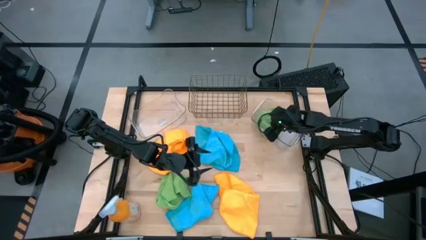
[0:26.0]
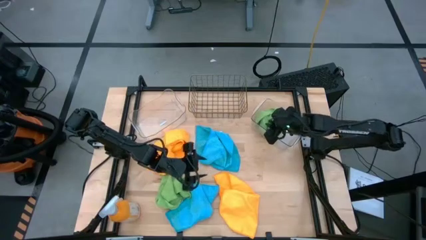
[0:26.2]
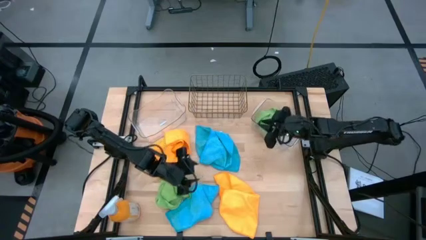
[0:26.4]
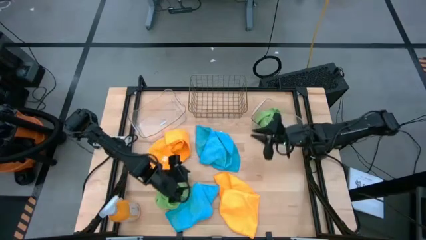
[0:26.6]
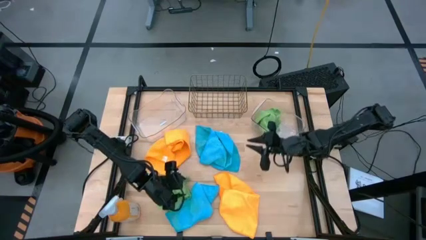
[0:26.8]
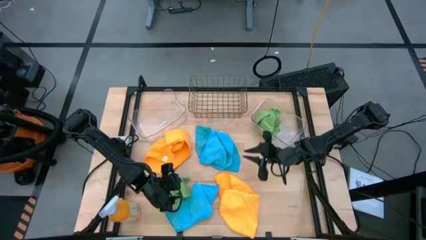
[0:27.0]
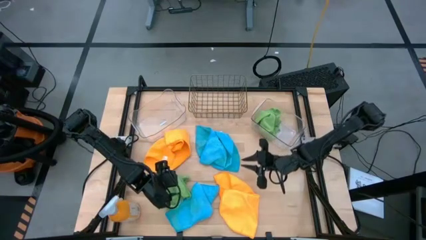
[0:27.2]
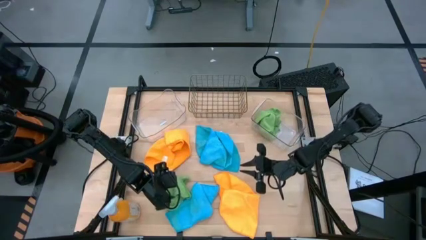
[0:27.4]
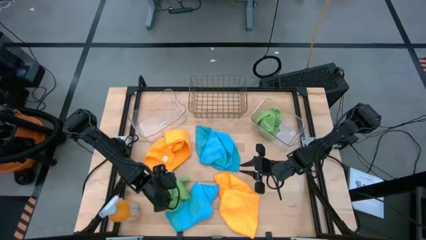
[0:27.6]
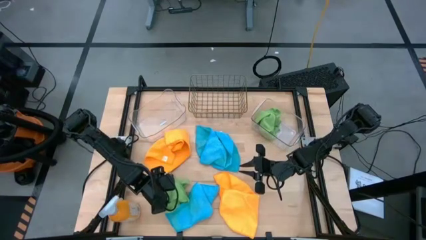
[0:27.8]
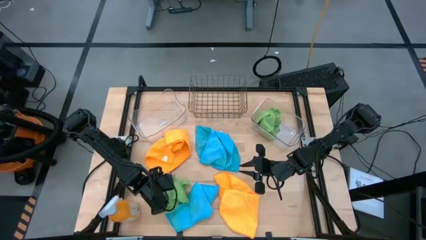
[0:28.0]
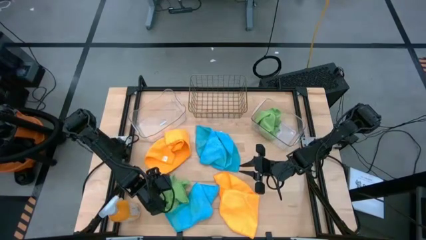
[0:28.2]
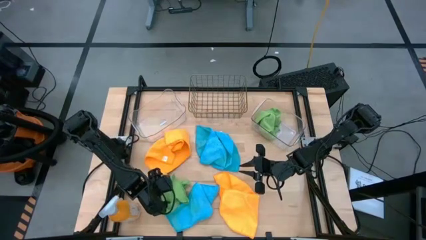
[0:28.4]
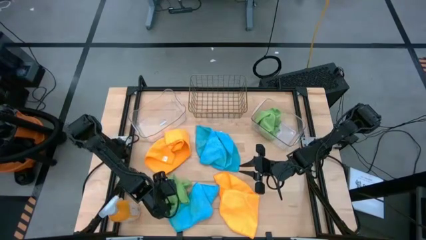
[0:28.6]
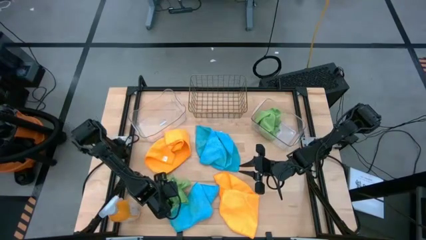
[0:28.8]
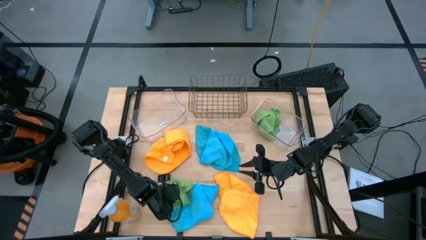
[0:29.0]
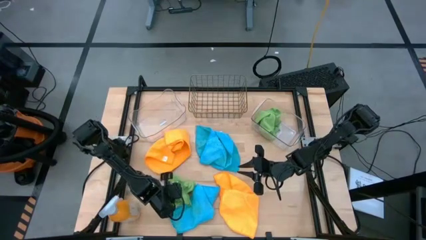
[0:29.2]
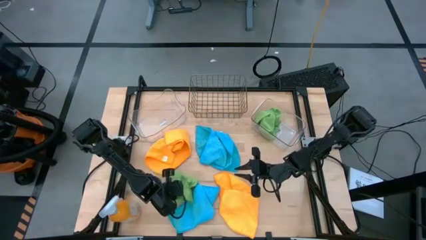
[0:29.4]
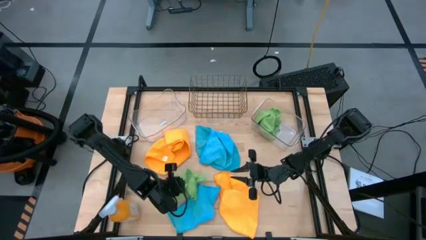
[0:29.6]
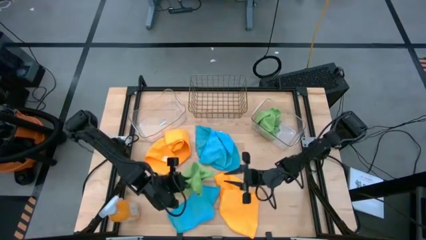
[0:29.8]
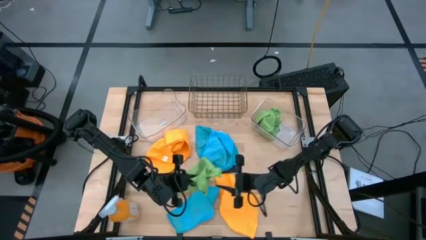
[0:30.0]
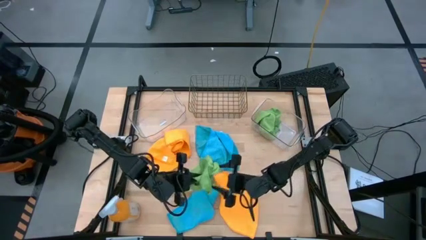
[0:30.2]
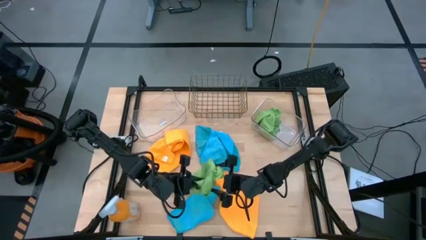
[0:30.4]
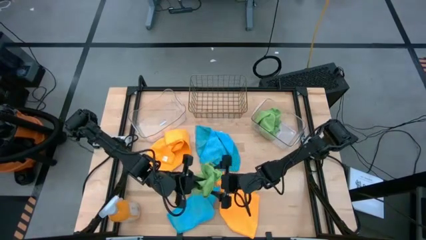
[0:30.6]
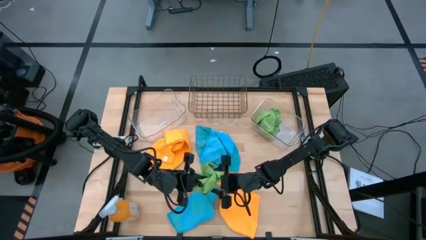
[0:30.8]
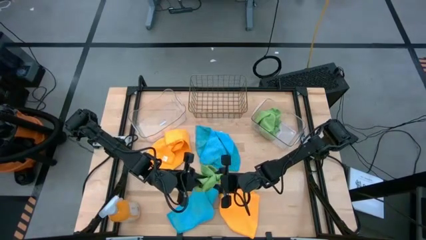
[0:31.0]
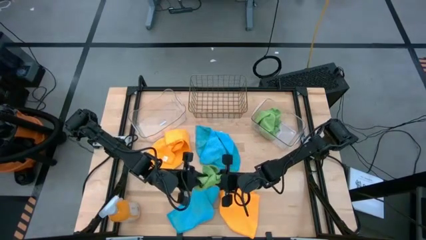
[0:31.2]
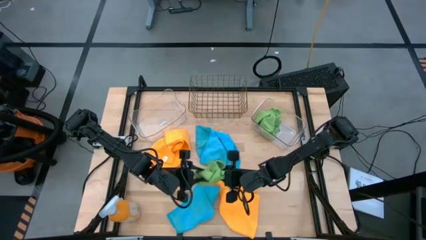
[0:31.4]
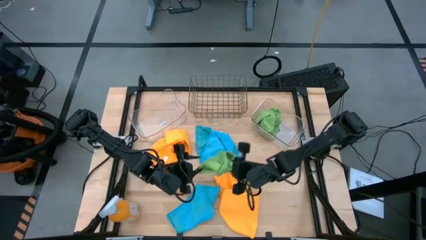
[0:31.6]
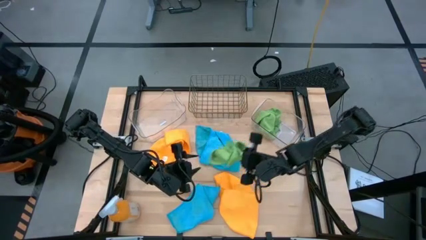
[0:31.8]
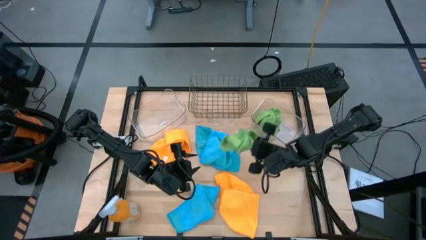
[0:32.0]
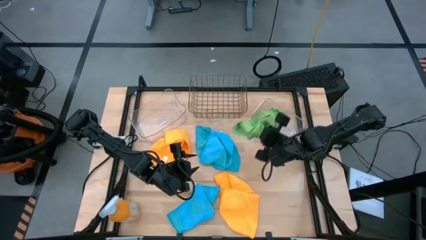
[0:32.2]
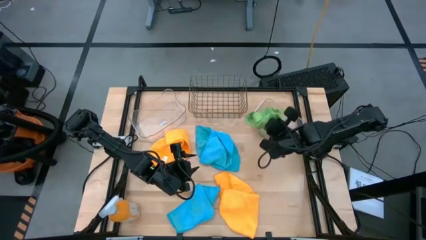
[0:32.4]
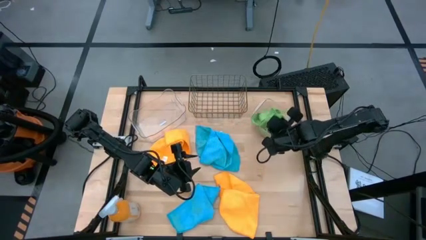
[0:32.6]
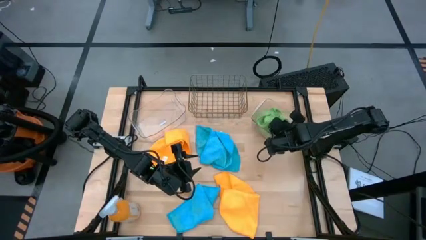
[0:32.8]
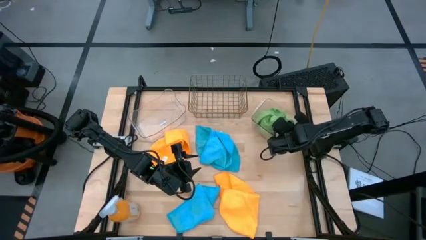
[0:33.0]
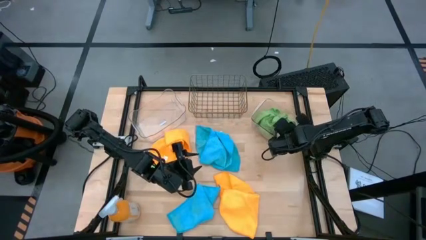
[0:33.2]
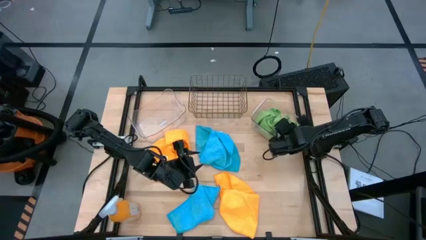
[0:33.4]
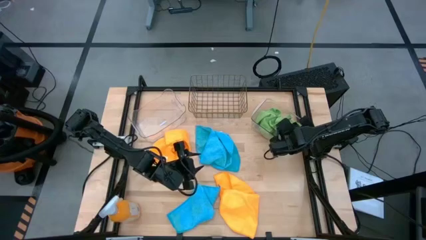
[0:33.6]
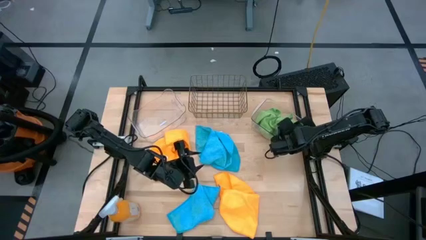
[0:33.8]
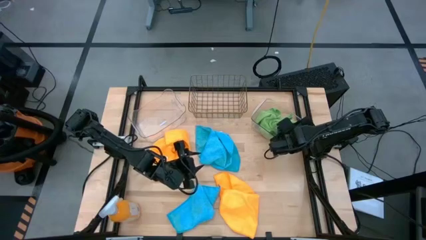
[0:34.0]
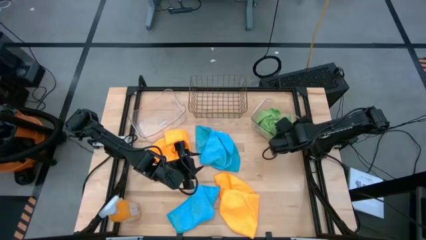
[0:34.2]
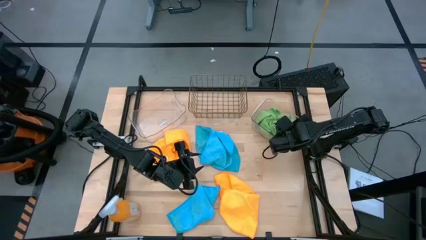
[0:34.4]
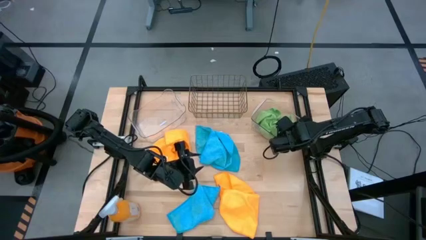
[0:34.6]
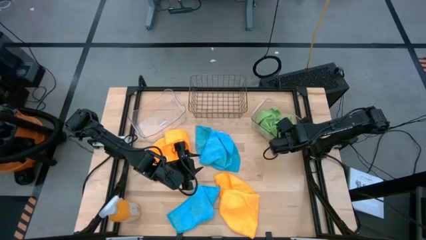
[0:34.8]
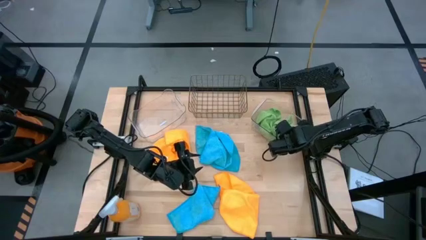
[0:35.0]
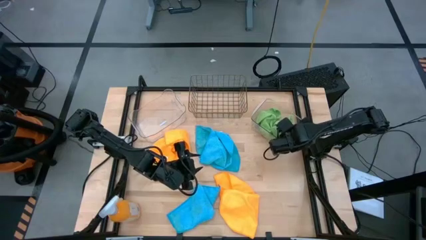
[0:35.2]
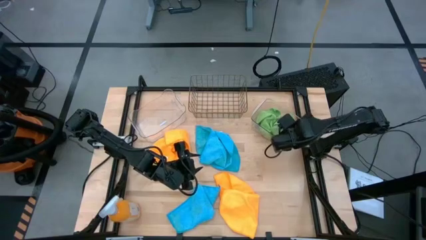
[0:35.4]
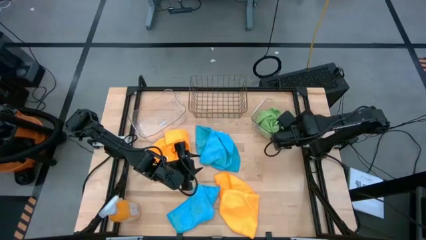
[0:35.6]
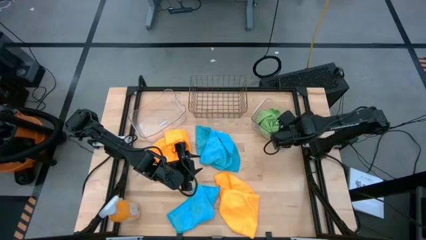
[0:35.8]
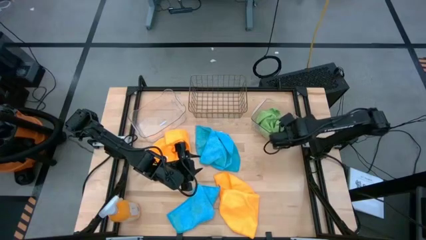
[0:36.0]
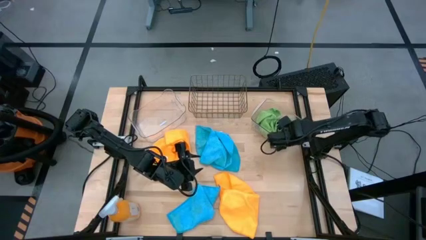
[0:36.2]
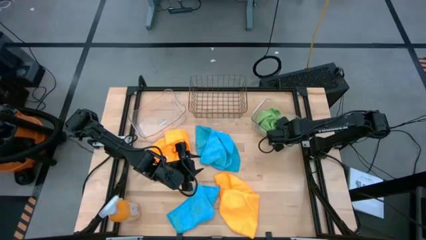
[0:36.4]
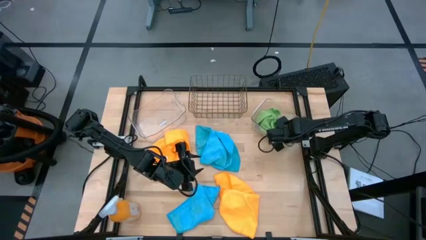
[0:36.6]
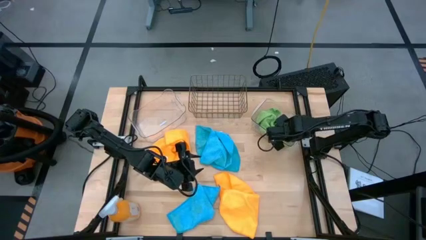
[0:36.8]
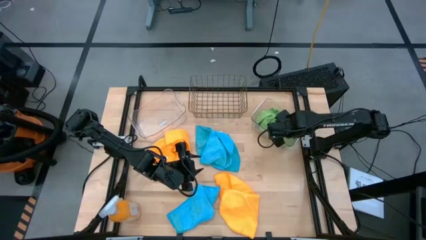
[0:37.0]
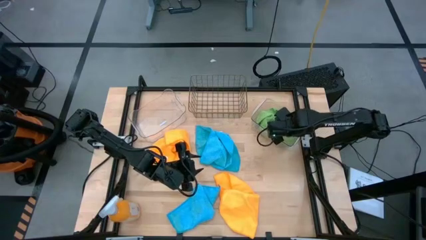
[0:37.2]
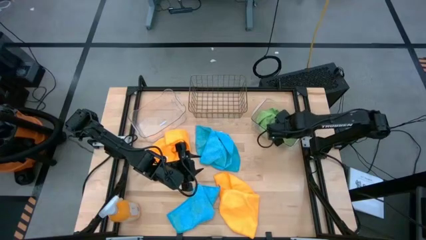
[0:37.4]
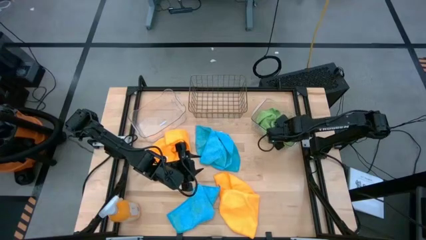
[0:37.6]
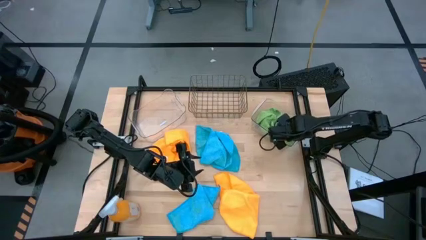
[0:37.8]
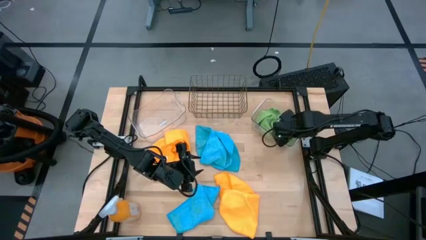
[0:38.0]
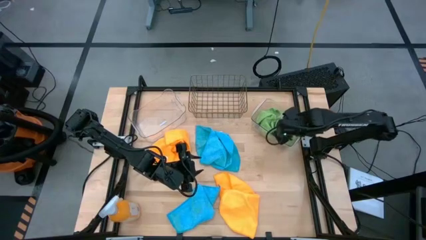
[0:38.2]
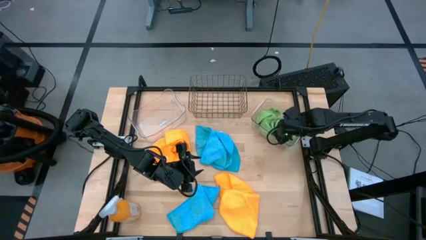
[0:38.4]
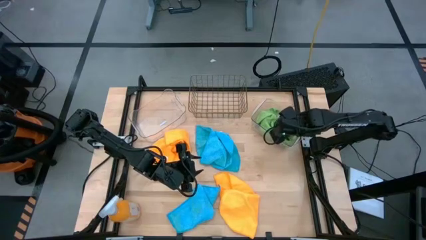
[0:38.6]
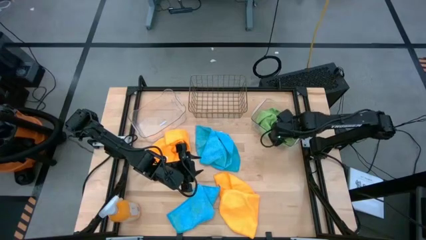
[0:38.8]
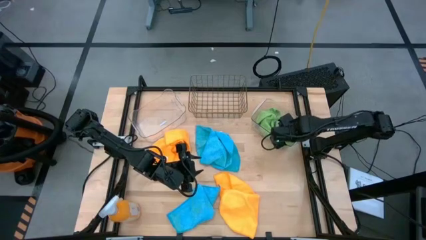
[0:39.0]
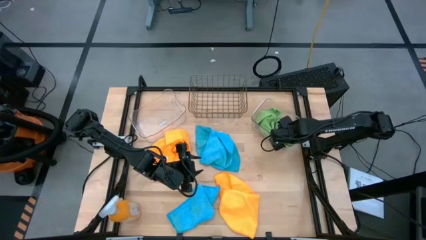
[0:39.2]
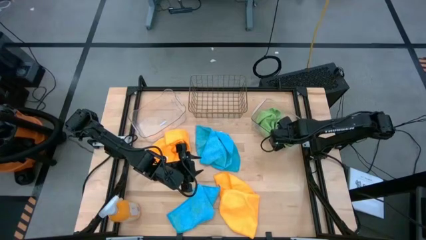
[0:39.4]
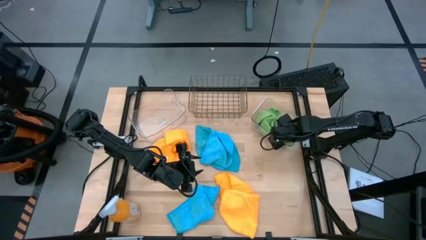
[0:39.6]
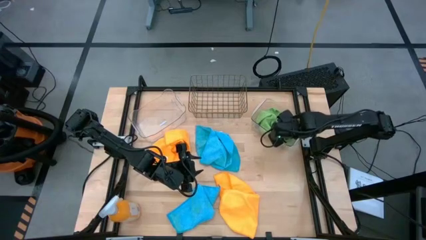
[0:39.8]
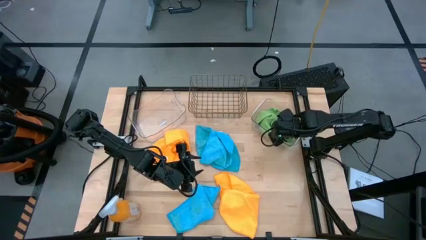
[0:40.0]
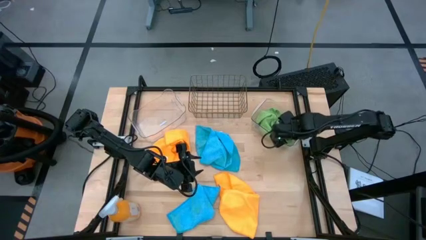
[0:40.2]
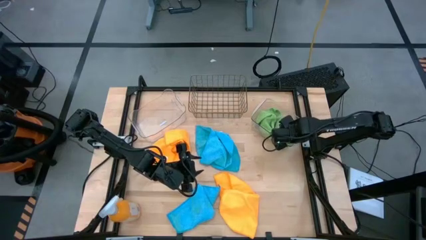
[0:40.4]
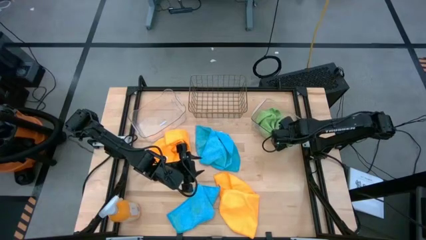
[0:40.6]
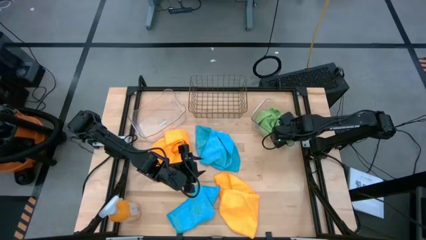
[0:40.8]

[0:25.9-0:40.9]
Task: Sort microfiber towel by color & place in baskets
Put the green towel into the right transparent bin
